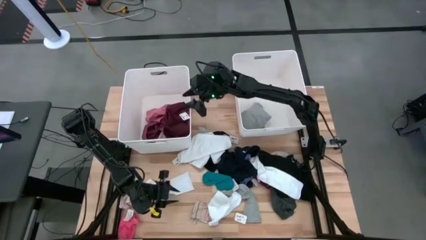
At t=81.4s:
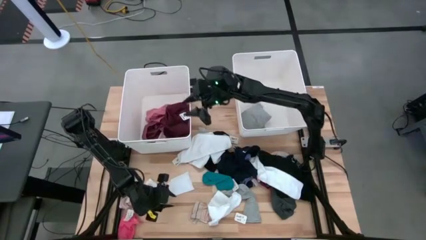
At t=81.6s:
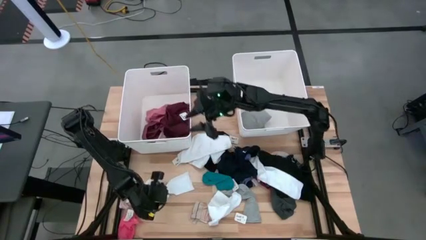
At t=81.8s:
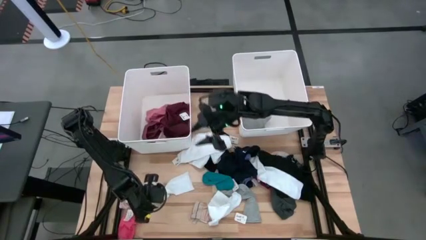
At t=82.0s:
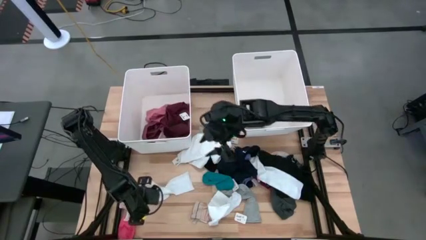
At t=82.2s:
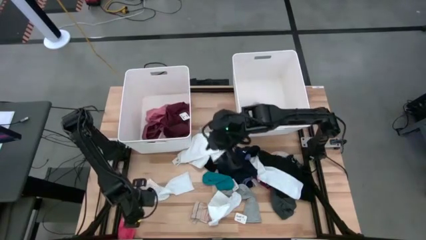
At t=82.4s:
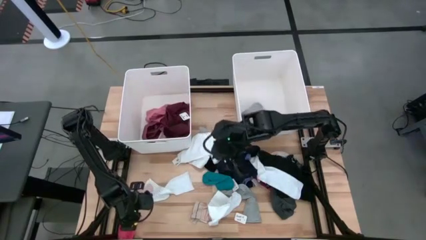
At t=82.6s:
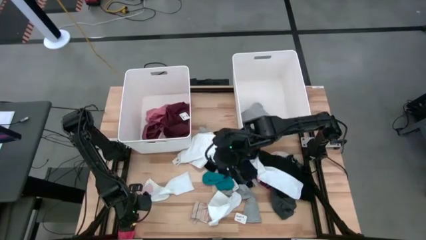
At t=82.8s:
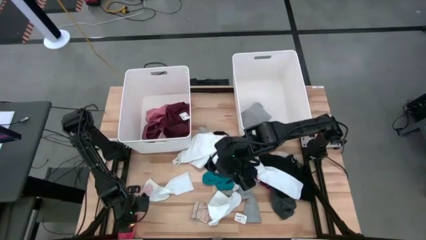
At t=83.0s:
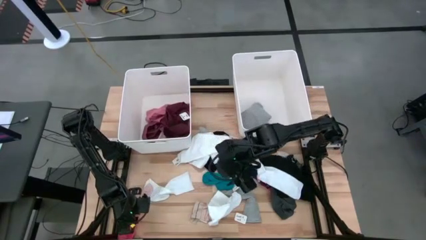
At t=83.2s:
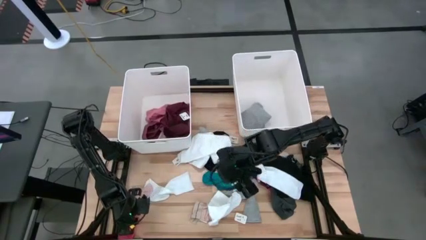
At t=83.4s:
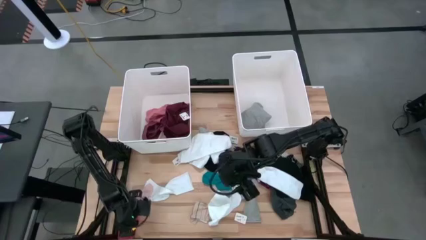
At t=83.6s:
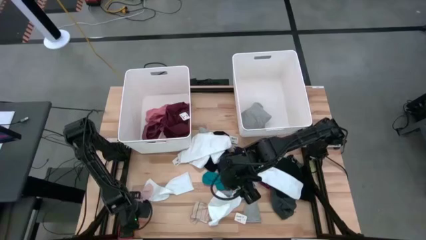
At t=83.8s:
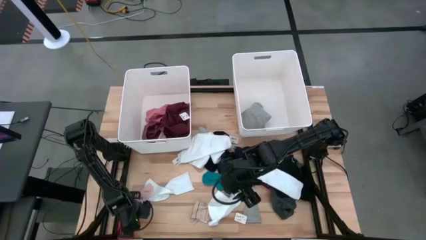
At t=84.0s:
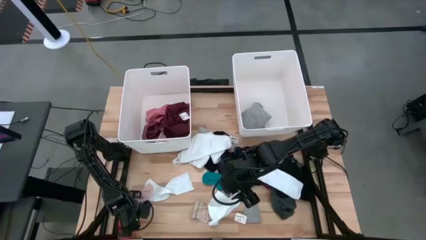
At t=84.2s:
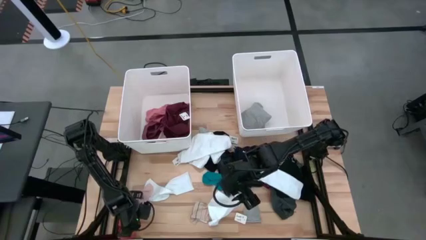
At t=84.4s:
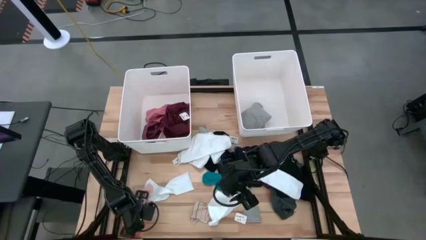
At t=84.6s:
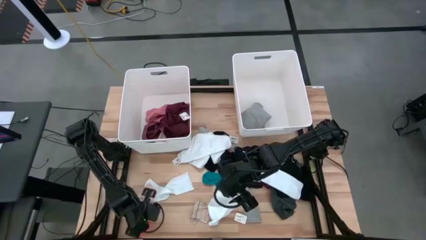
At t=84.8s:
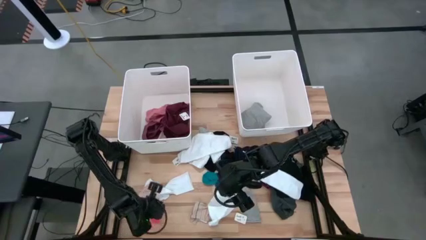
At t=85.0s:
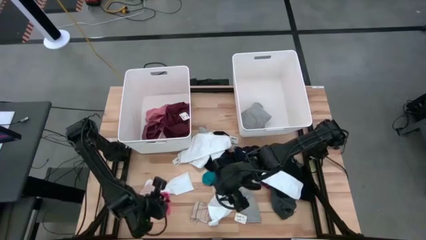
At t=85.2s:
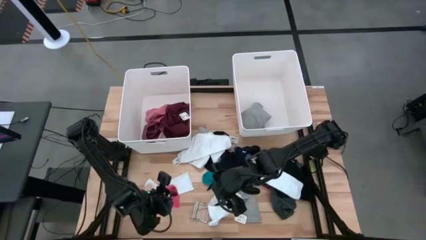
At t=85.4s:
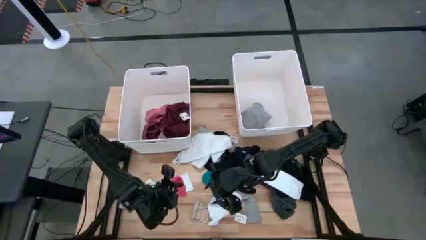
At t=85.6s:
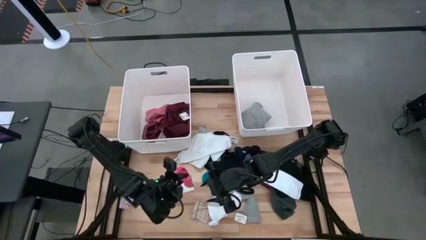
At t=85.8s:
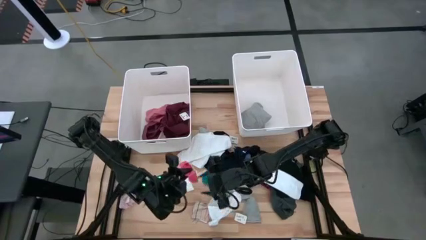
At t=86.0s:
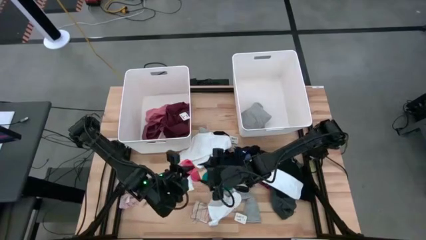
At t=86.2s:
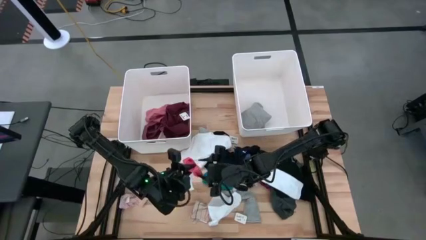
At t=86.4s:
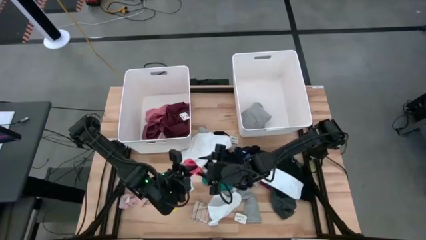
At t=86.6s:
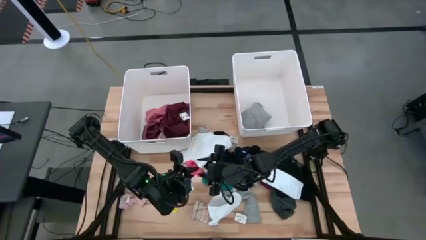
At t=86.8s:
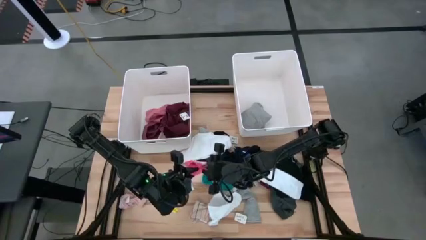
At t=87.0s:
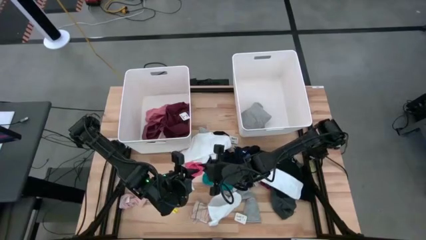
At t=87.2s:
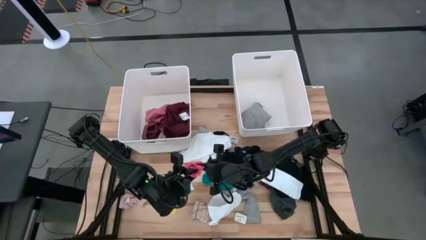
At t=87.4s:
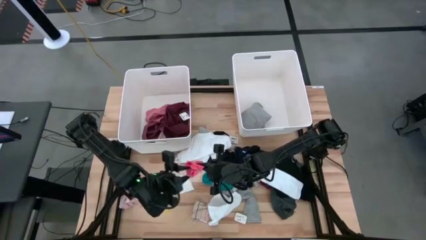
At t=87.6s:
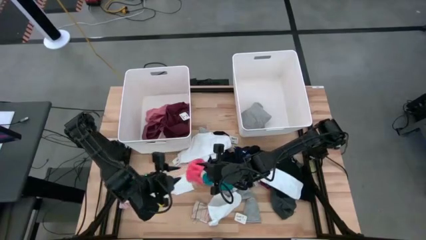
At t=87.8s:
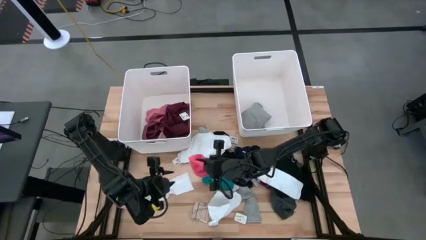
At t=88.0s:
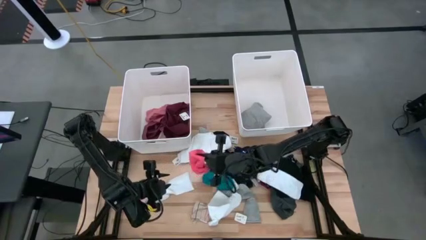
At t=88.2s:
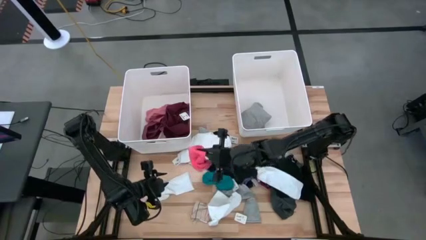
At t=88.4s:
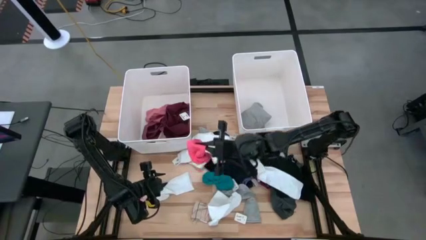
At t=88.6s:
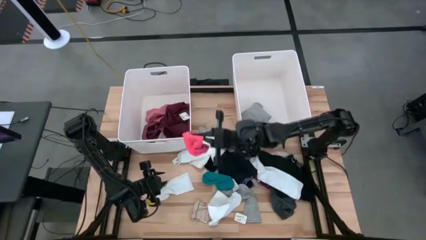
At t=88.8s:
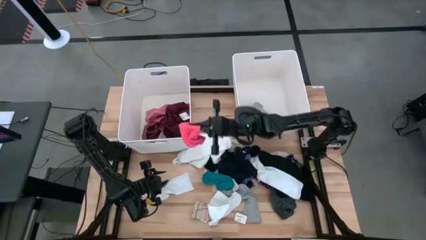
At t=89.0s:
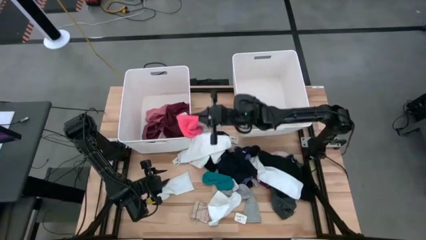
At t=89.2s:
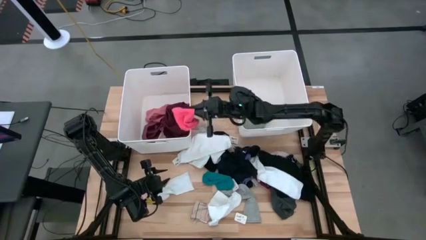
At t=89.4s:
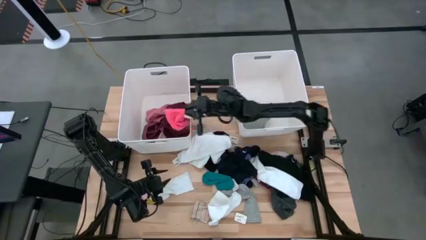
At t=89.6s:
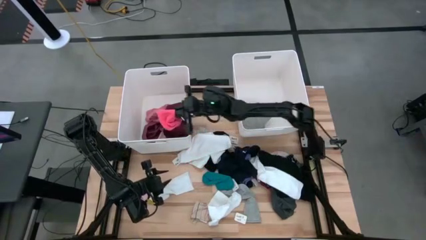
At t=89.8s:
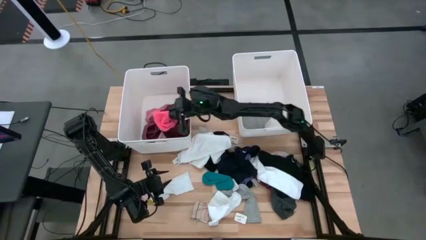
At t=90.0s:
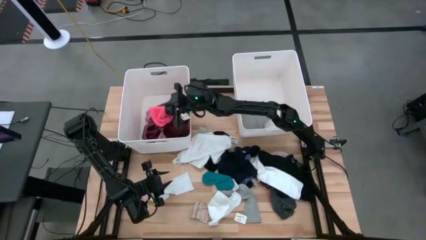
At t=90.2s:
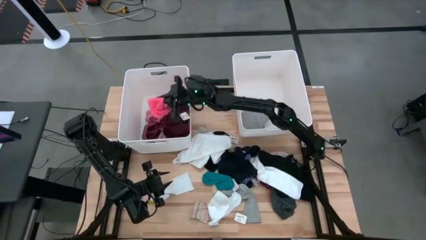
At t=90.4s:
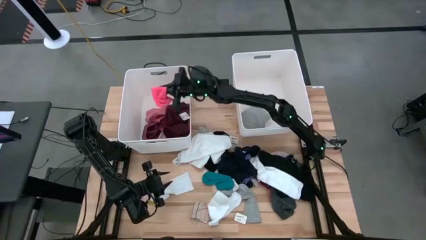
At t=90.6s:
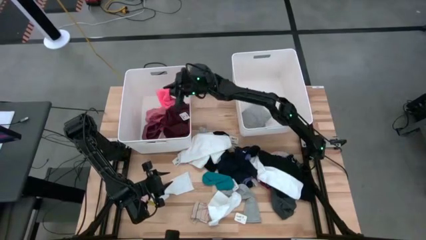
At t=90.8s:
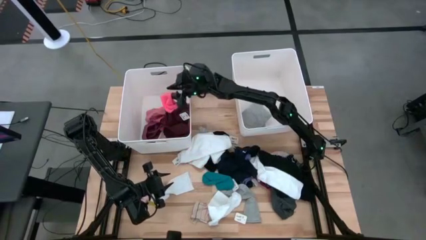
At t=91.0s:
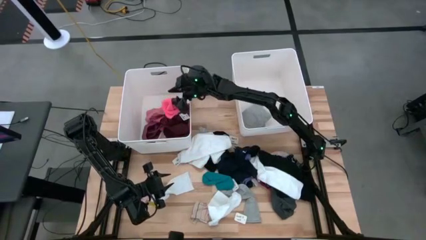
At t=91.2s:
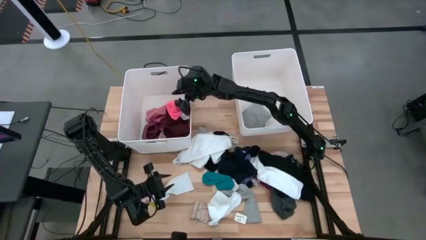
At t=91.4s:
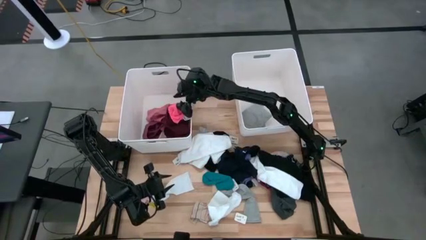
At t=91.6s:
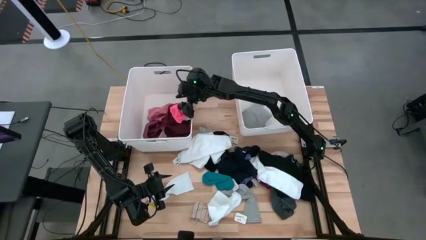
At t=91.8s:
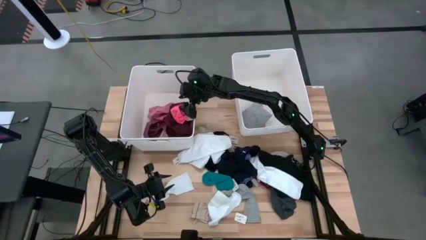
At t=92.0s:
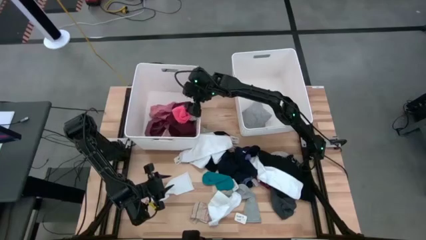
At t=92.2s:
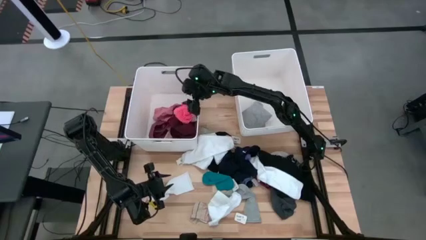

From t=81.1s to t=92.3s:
Task: Sort clothes
Put the pink sock into the left white bin
